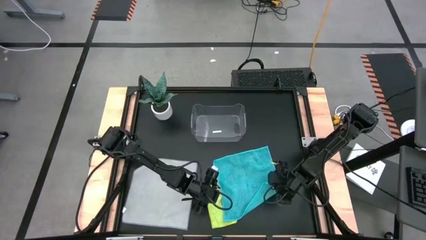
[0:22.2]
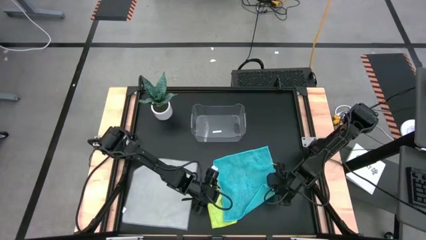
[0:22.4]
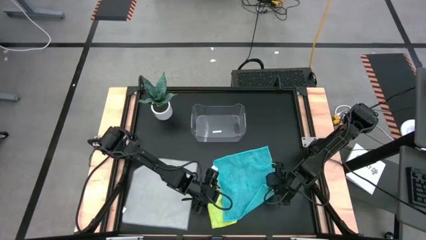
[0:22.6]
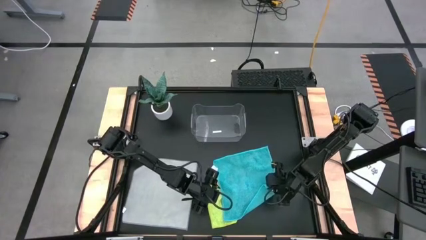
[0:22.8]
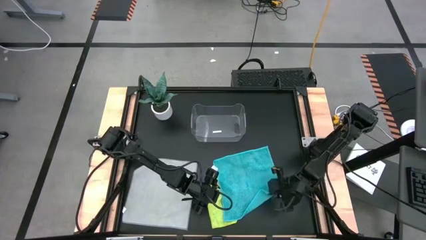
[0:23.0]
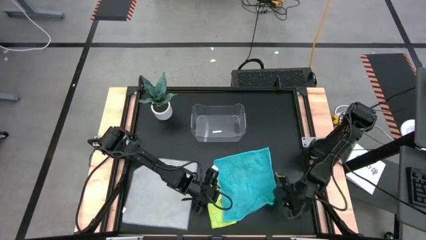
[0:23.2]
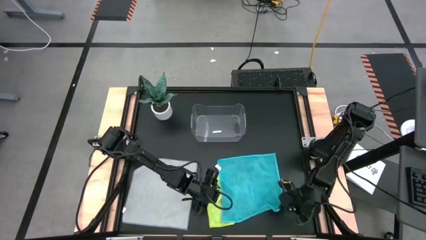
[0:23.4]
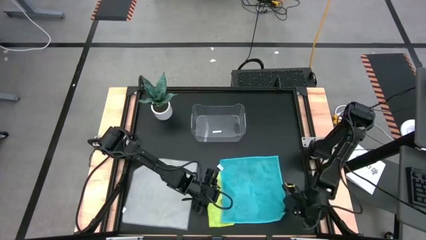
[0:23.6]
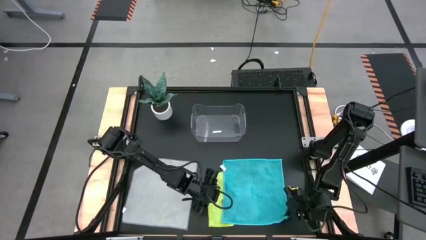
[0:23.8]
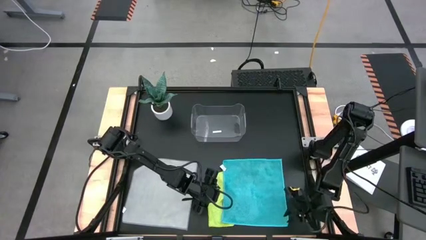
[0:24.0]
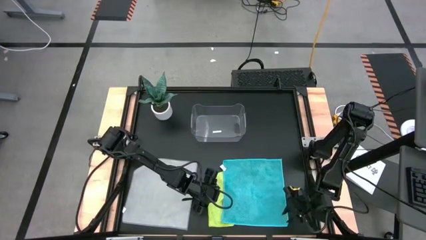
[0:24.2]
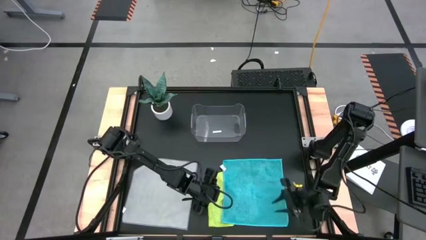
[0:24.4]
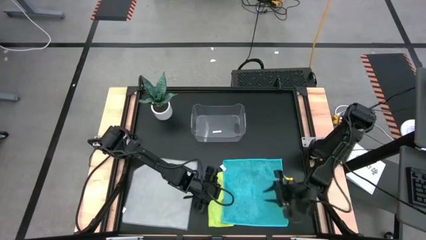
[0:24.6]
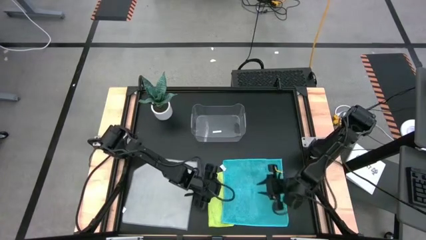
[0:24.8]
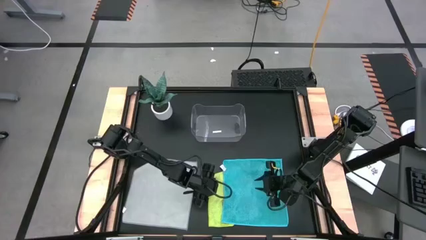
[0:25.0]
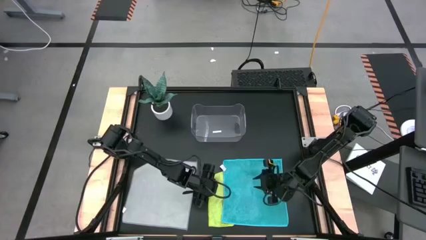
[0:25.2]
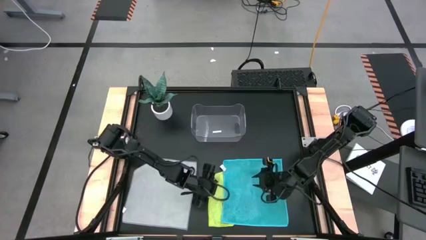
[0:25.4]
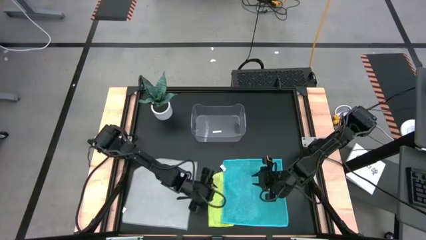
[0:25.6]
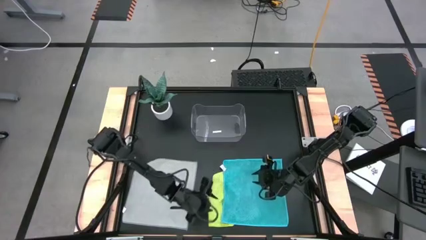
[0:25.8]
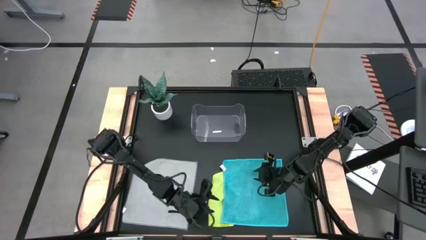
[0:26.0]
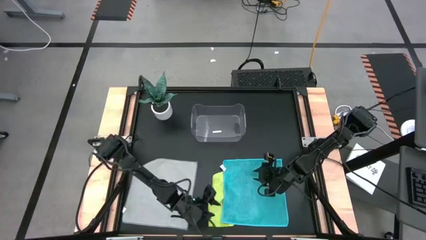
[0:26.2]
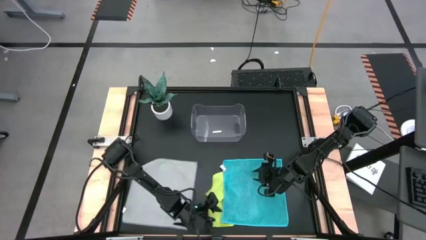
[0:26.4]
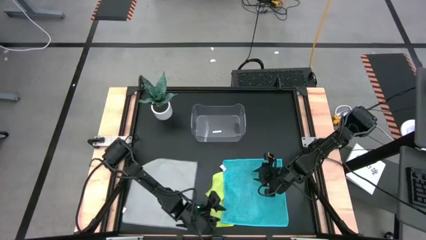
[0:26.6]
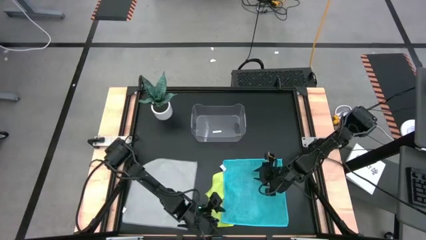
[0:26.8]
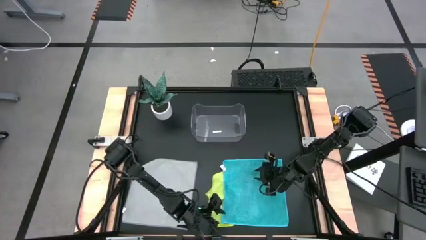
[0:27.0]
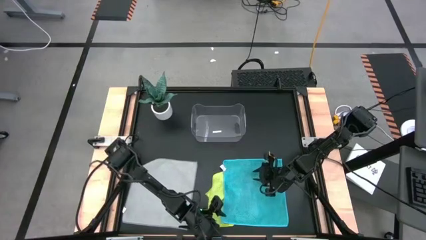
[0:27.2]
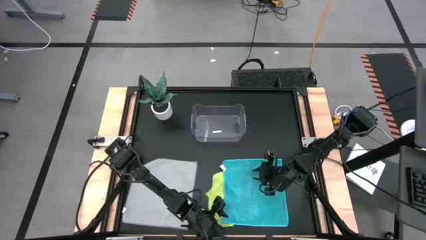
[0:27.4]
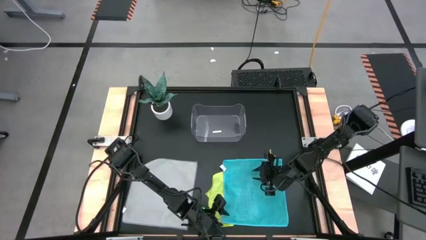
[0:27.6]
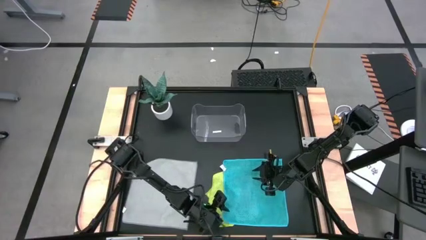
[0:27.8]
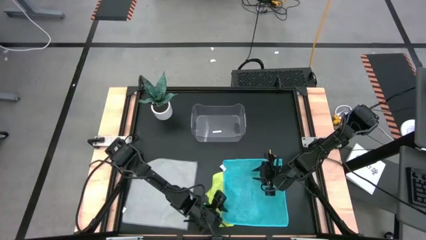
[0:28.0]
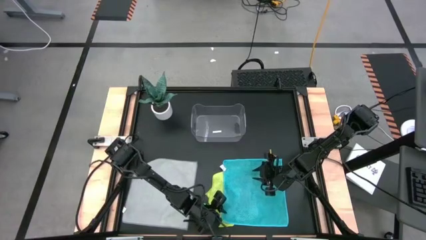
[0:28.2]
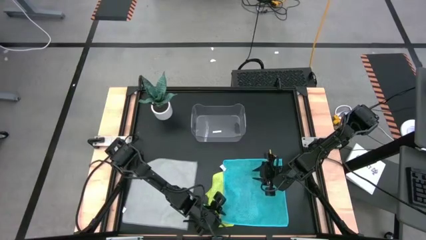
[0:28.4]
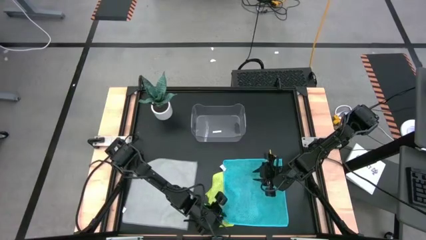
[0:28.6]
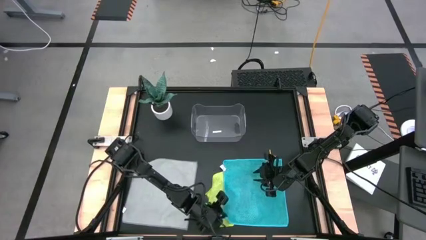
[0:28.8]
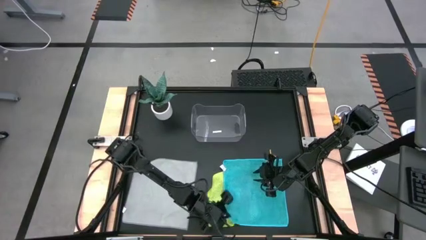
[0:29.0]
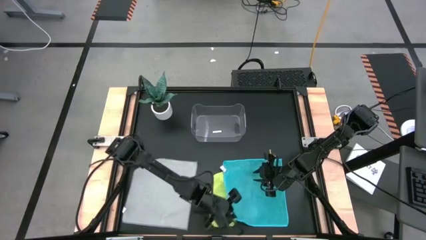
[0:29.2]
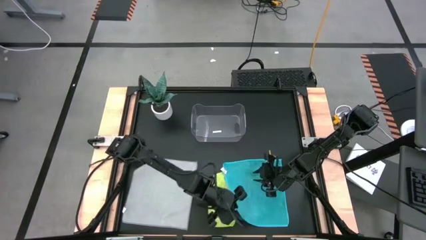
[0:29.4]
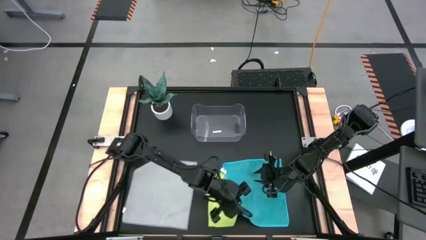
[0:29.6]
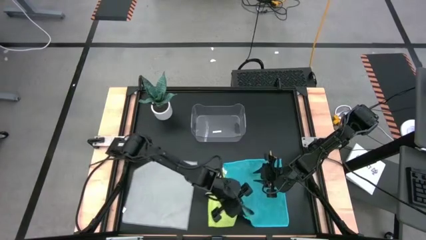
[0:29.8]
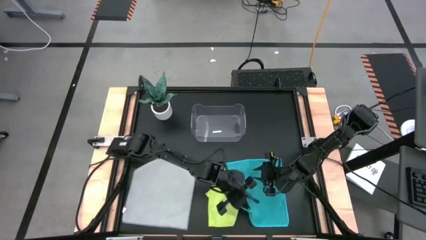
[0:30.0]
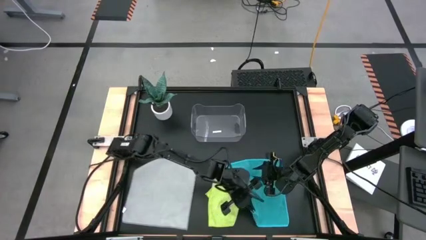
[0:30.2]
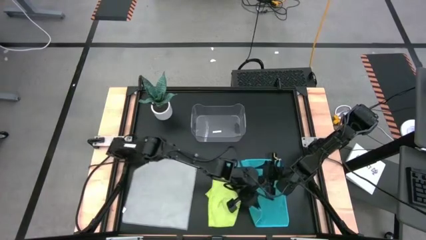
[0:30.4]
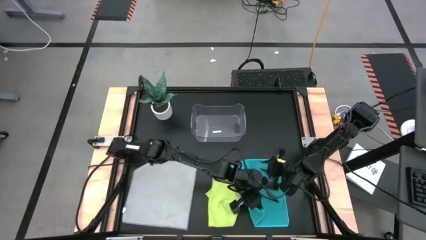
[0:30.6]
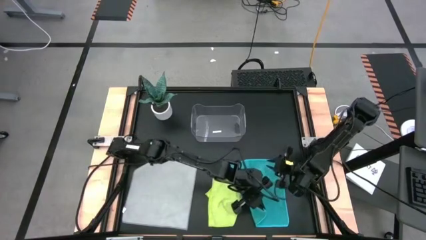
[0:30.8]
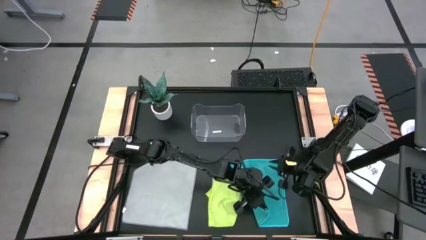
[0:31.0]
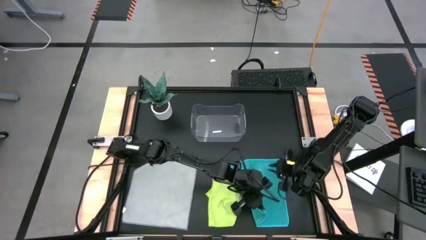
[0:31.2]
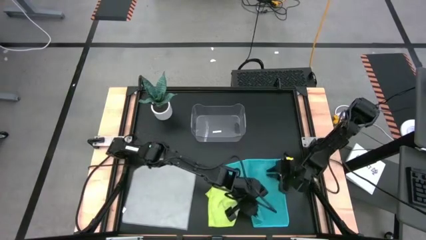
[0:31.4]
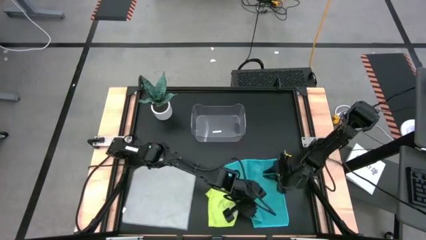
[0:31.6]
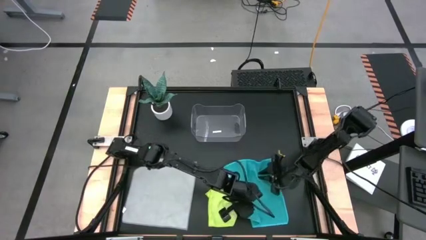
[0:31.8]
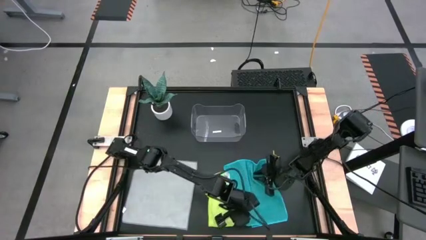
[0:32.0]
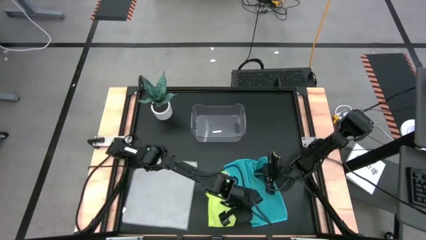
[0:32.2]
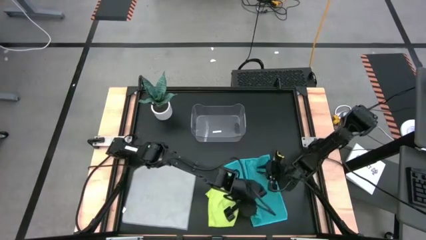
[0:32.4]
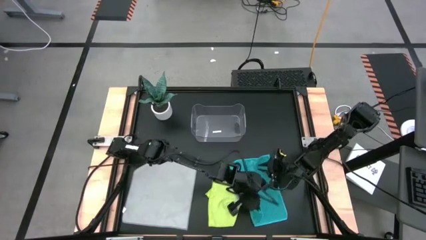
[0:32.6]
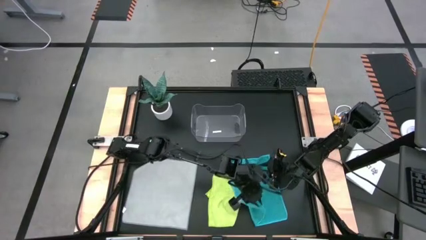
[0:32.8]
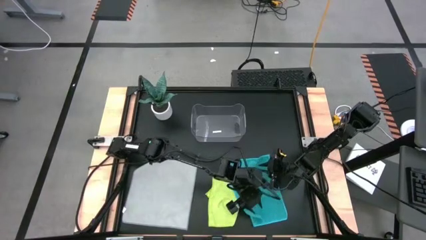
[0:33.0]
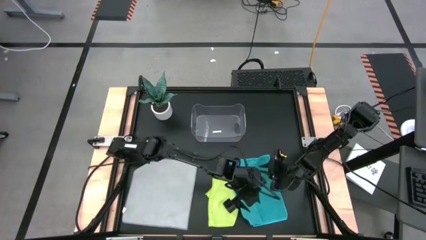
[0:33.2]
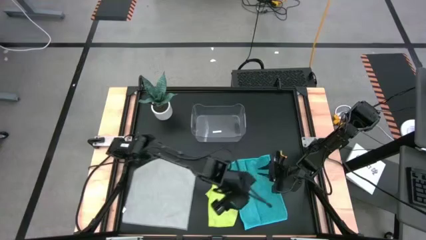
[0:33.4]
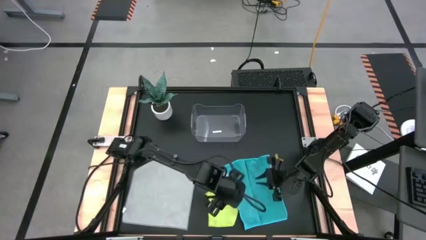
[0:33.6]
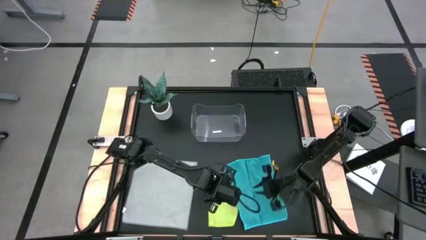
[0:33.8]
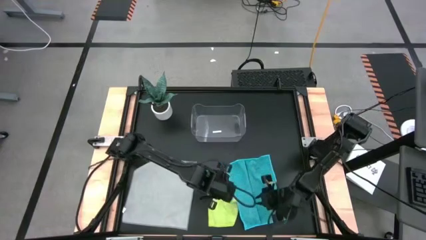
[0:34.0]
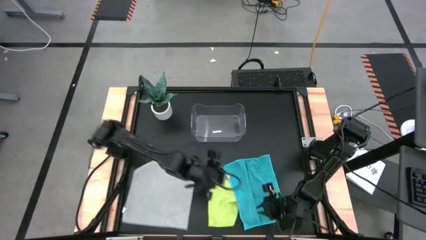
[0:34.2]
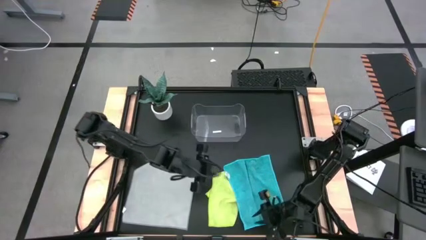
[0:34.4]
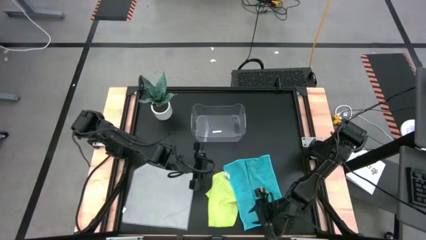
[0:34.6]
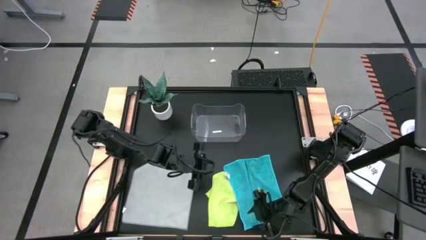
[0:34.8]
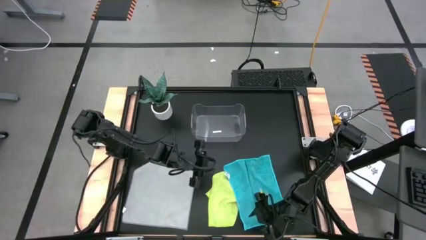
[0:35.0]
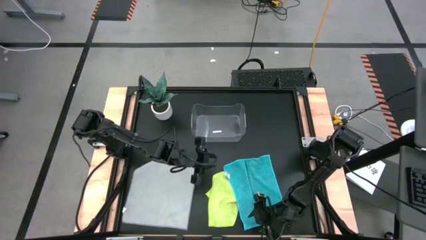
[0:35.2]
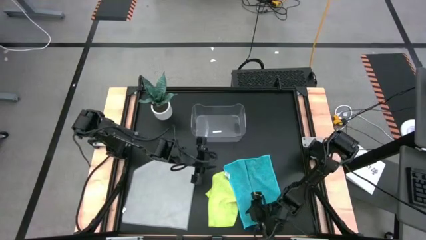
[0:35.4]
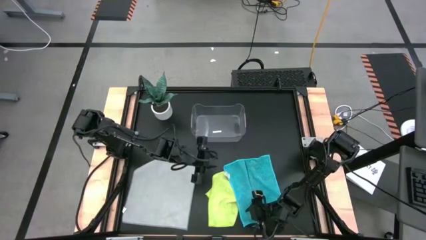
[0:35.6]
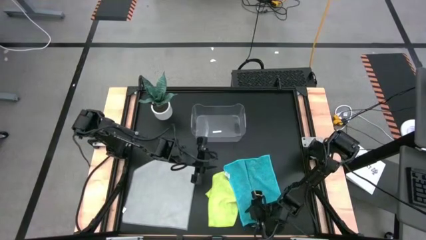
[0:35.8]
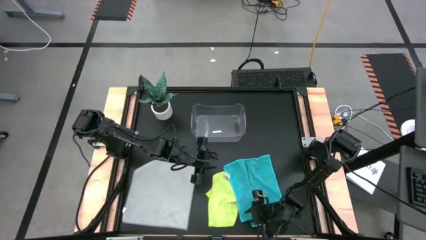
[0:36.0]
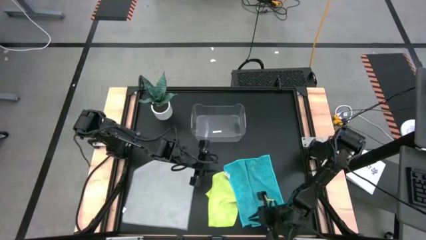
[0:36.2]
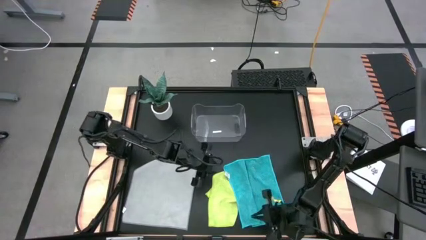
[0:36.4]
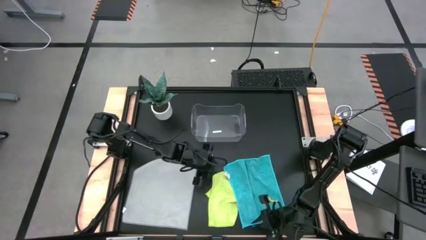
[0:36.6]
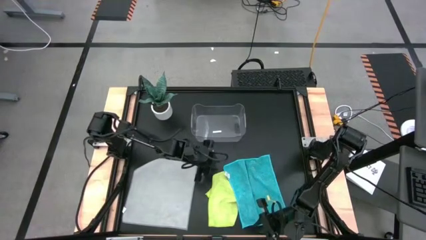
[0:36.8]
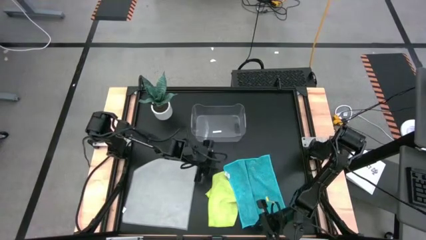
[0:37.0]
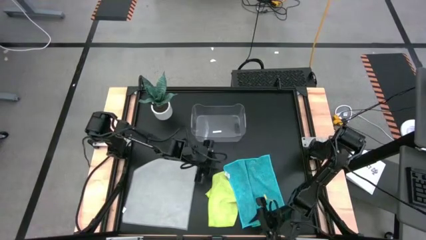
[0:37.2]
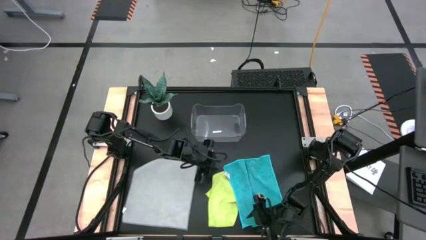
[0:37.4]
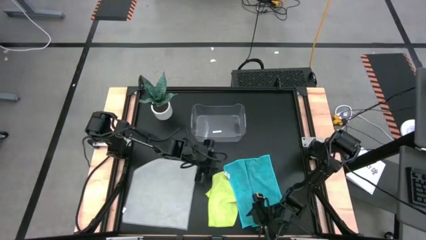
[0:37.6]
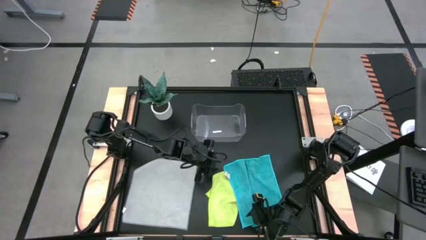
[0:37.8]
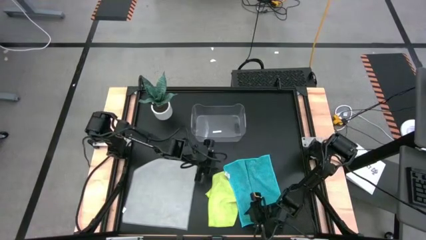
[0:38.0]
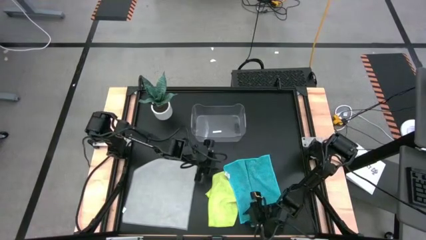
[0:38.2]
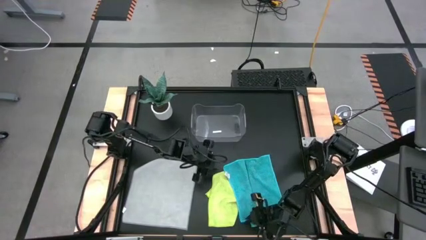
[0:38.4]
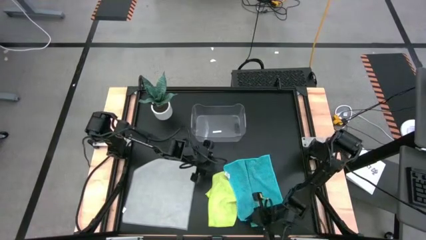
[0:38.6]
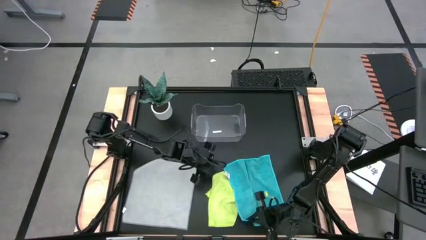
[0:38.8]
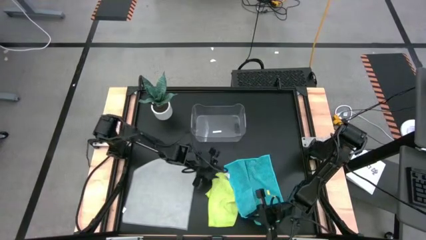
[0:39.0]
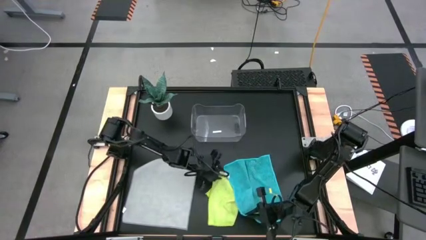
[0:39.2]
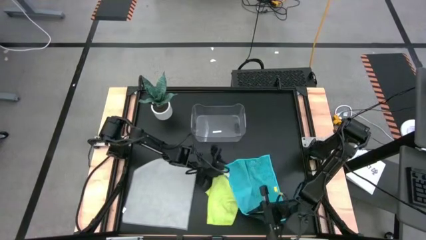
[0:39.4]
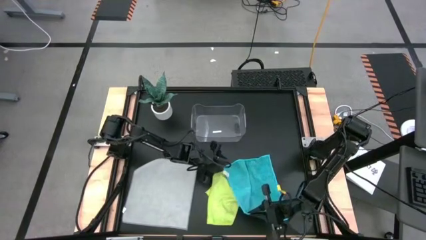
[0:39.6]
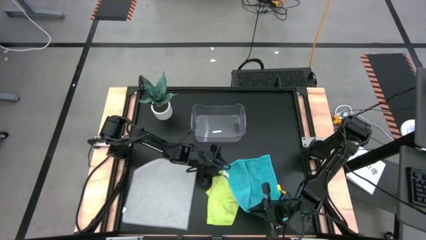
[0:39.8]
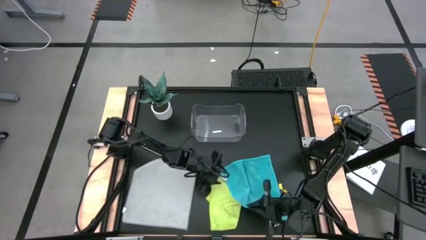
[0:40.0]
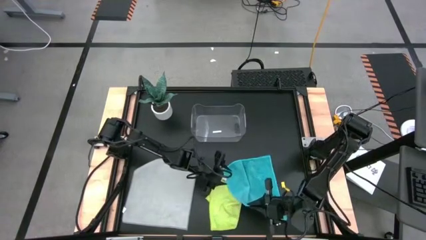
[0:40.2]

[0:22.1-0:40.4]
Task: Fold microfiber towels
Fold the blue towel
